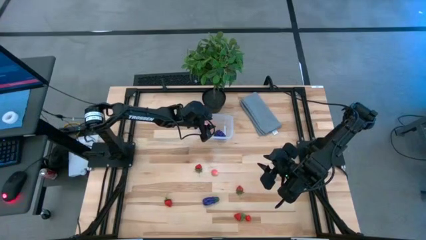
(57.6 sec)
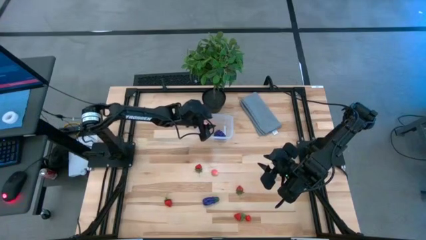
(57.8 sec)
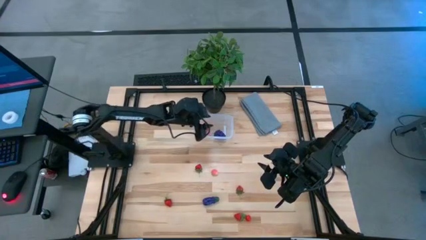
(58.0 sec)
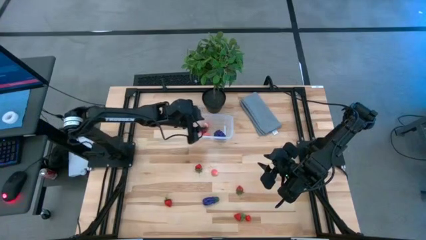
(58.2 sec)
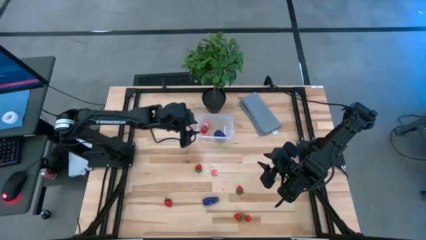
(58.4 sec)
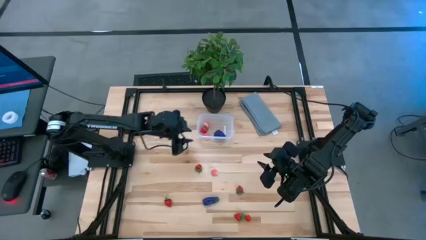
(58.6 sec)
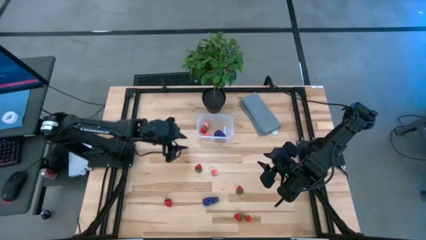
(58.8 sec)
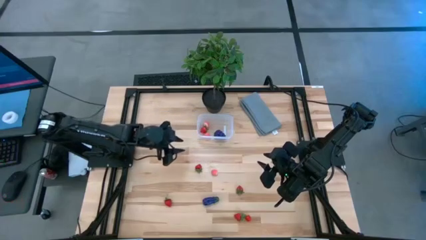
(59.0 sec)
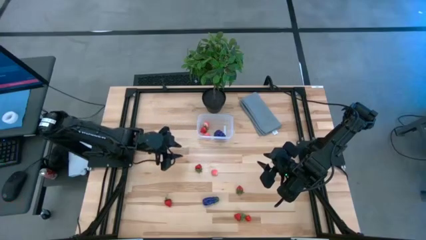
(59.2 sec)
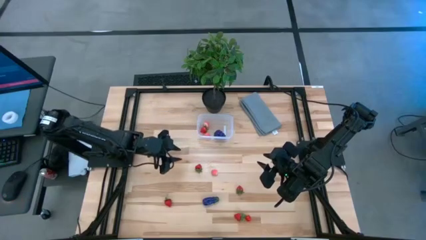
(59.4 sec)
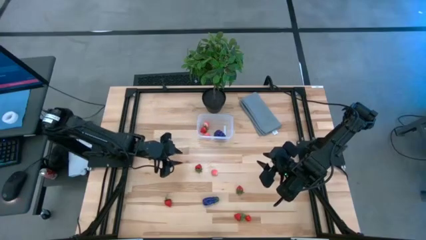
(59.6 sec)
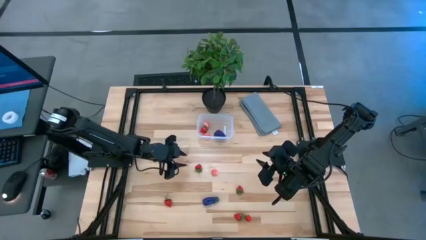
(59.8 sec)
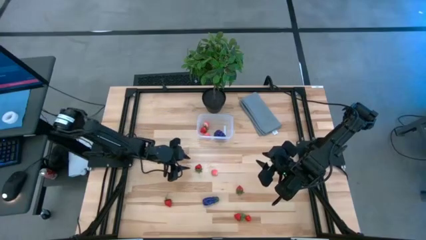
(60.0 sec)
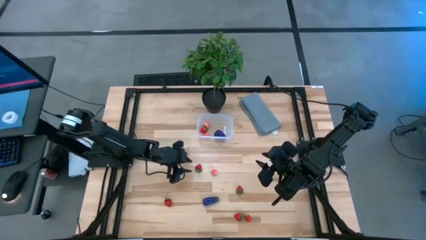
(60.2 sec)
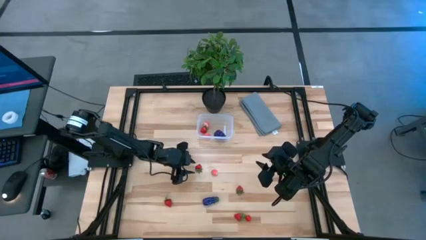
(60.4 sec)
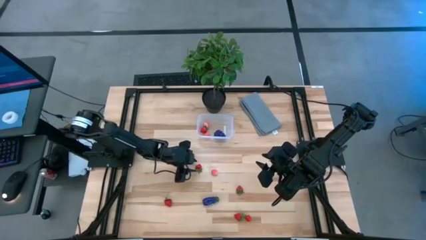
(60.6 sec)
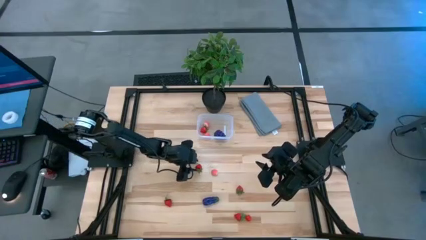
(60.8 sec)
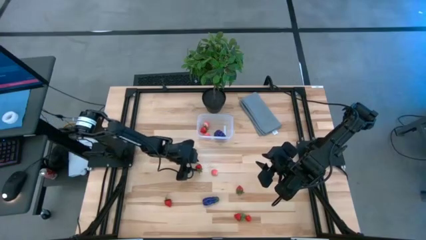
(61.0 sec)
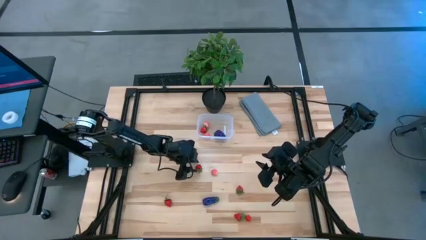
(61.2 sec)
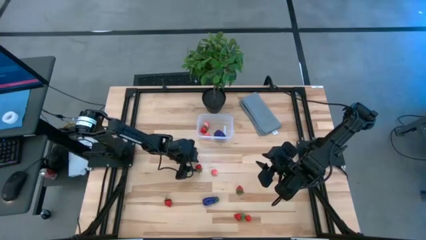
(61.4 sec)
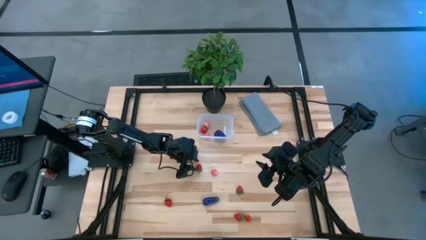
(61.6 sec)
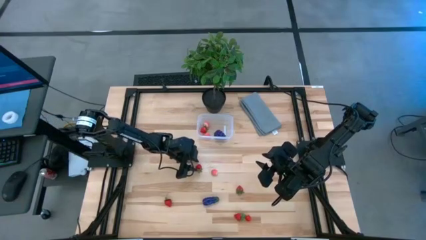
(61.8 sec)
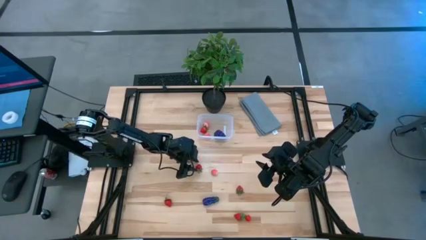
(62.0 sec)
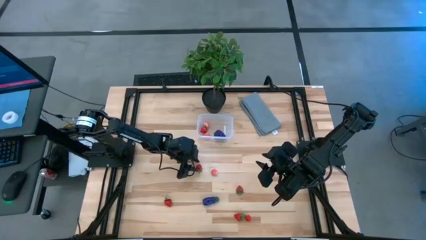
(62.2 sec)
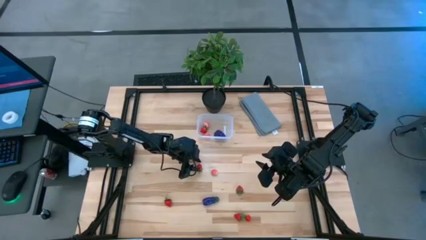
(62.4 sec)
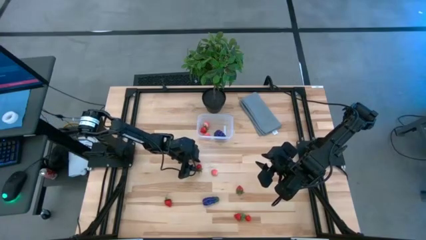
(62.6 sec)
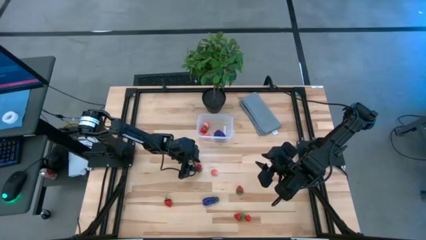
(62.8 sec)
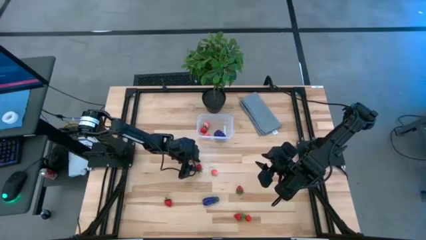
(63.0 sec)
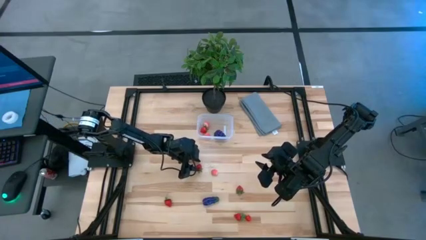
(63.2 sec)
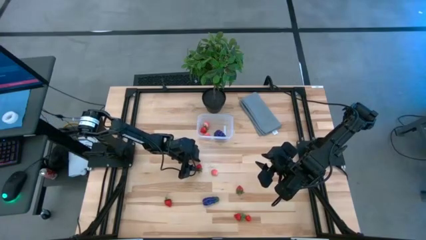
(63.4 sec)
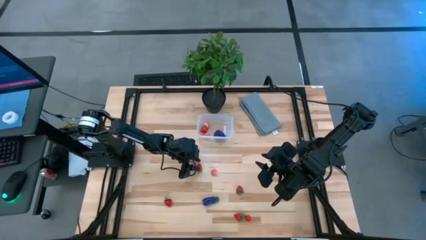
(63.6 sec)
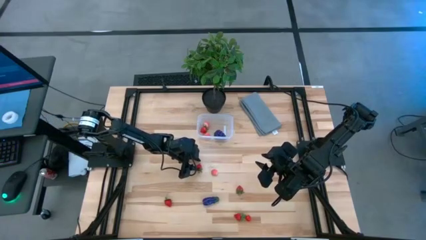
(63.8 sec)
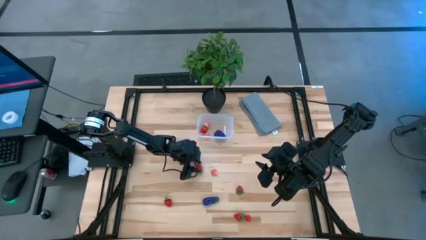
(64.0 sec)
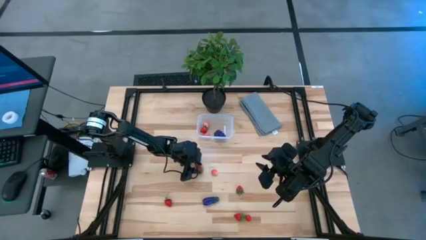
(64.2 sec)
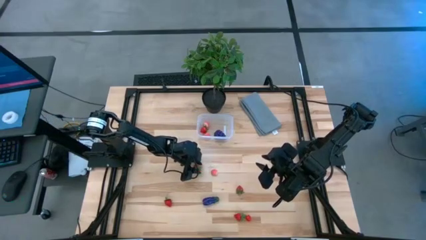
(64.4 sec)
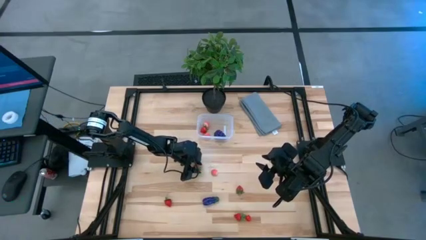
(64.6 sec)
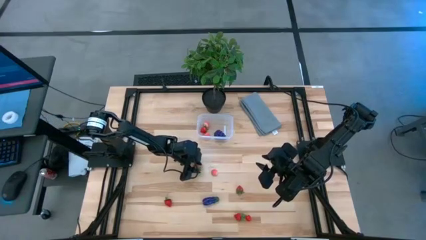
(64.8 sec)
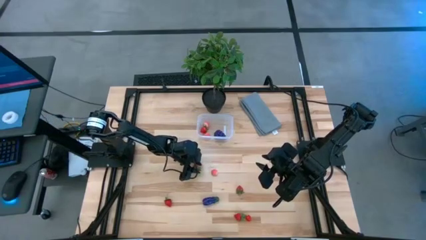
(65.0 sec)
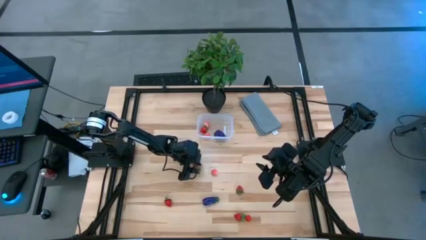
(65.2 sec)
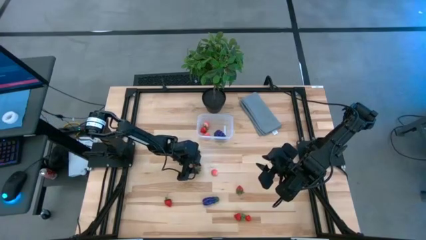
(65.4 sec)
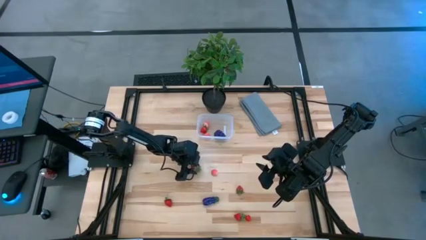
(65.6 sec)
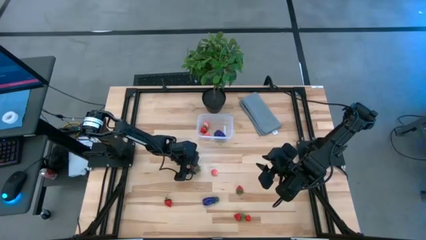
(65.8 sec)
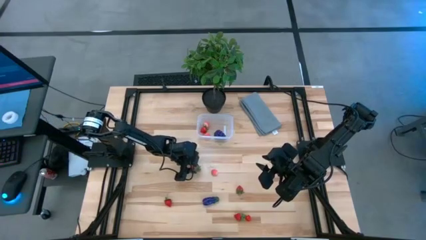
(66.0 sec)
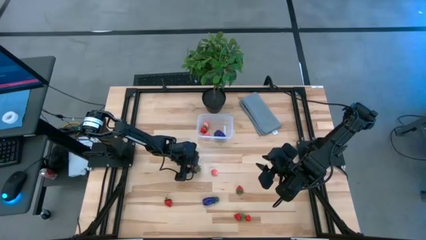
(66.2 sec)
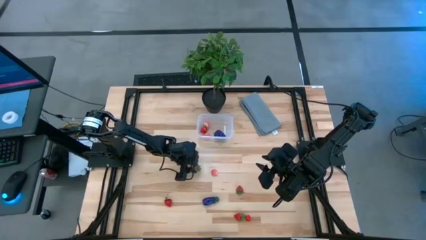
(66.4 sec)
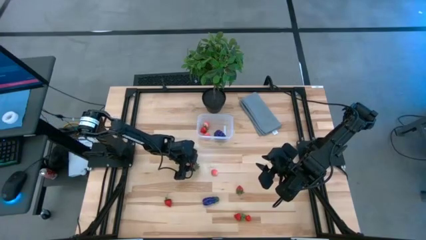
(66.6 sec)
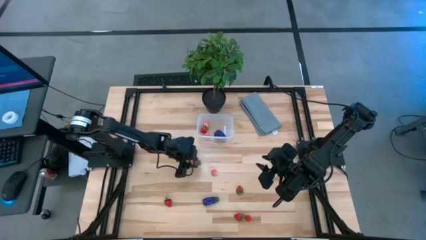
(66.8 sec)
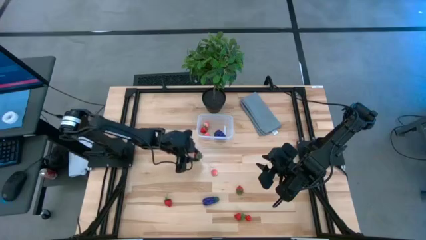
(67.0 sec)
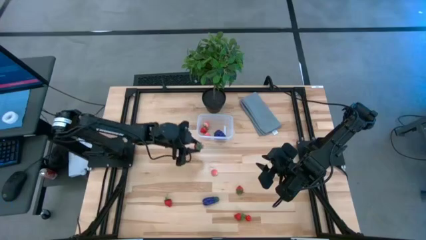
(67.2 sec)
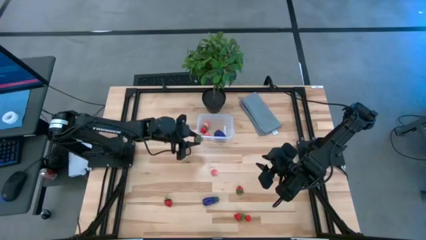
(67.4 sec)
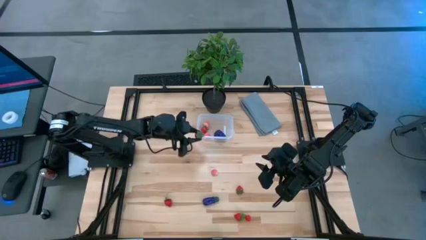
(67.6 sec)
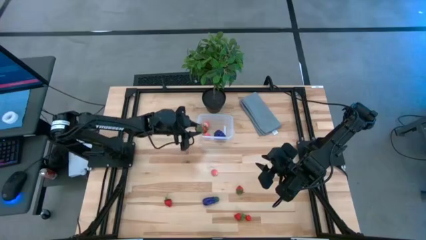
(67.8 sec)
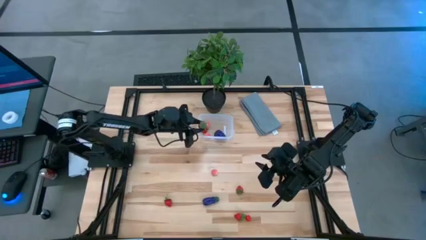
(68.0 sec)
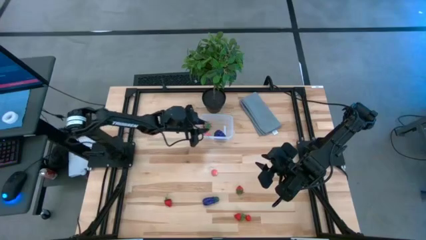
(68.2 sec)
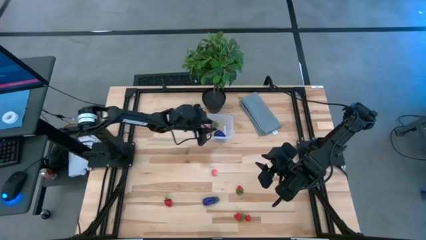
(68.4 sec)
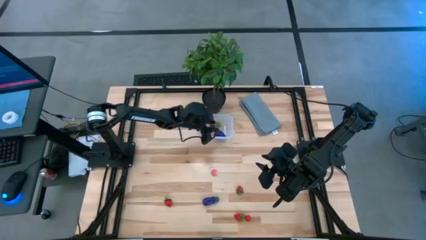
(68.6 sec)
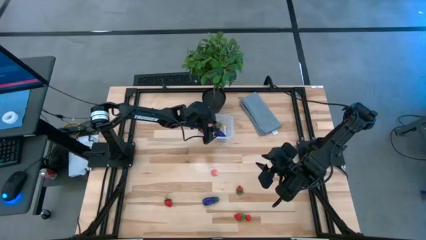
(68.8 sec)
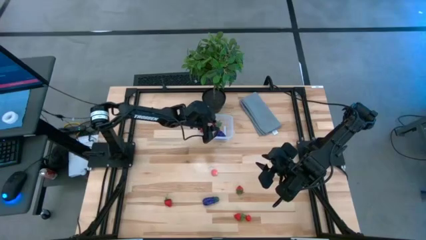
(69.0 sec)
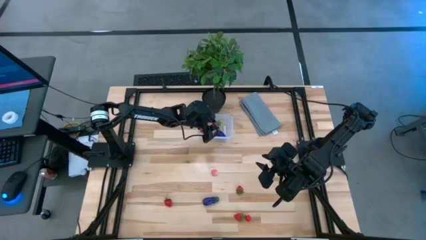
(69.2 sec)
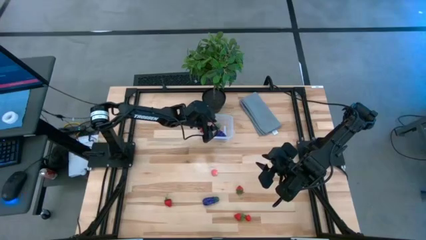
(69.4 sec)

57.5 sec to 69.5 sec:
Task: Pick and placing Produce into tupperware
Put the red strawberry into the transparent bin
